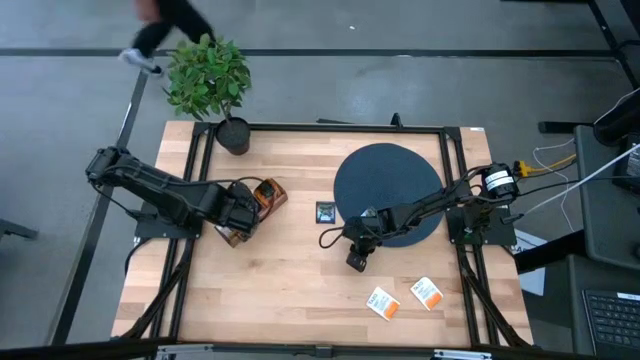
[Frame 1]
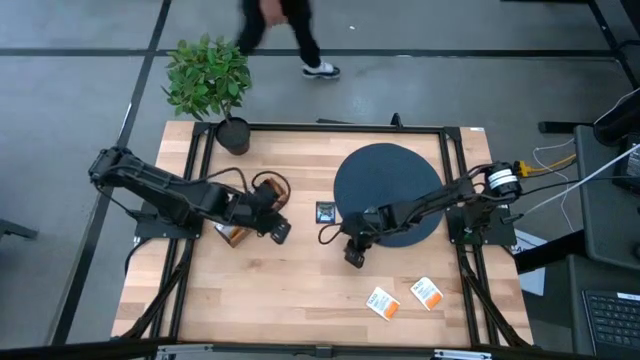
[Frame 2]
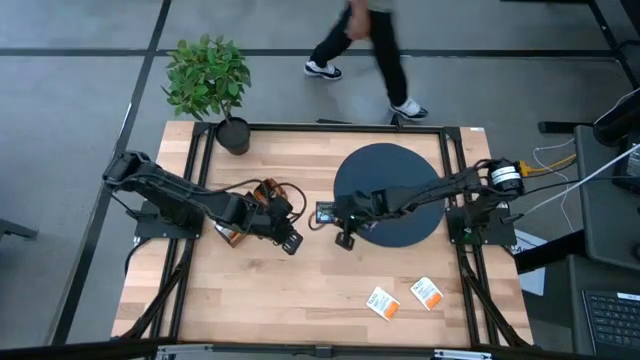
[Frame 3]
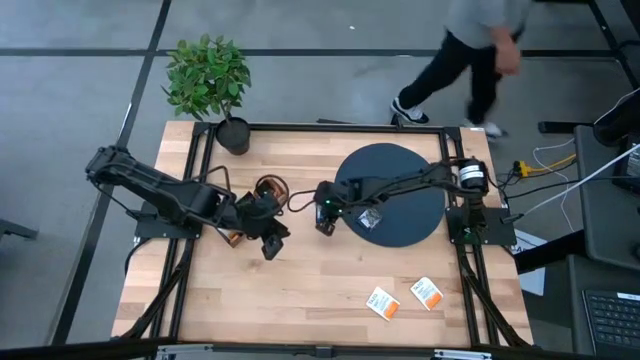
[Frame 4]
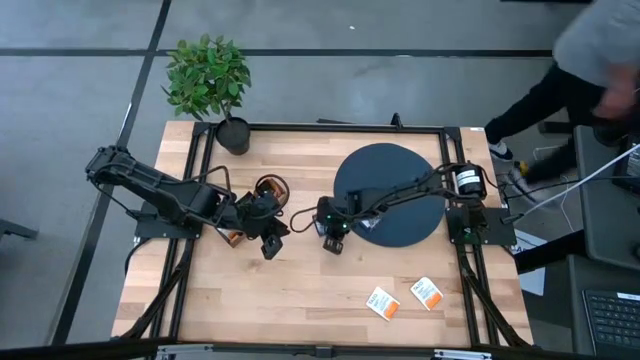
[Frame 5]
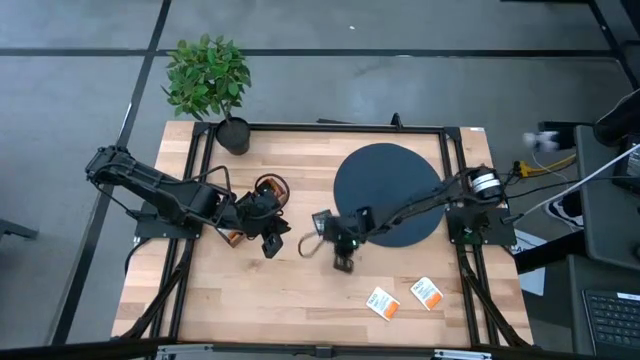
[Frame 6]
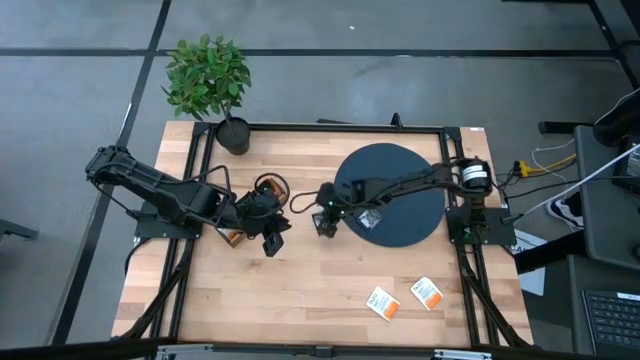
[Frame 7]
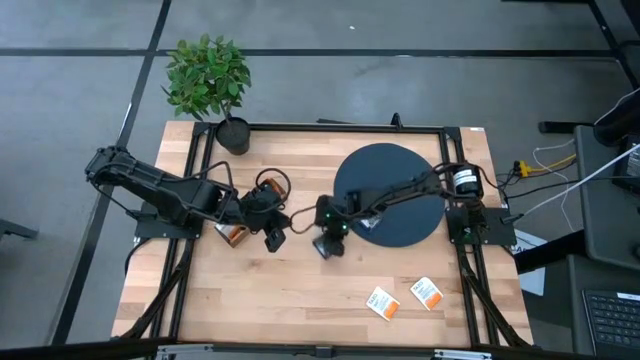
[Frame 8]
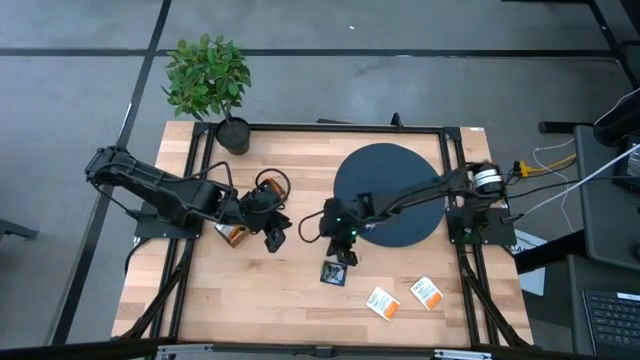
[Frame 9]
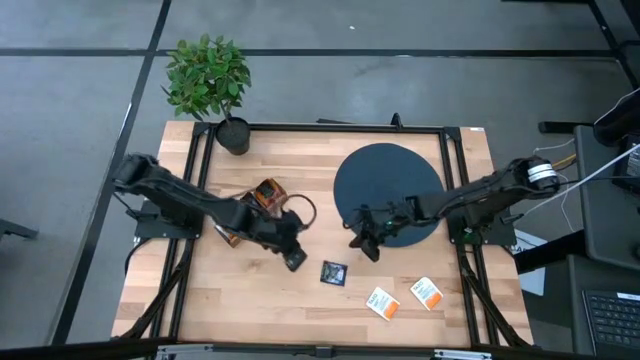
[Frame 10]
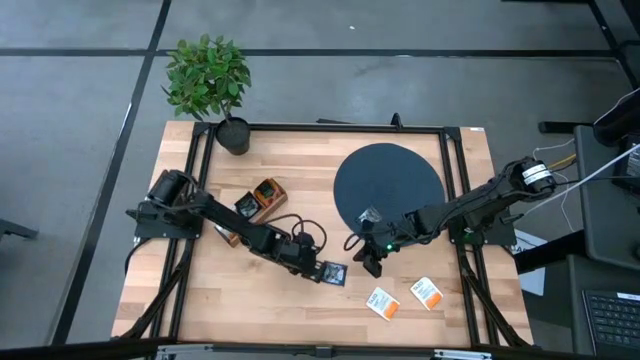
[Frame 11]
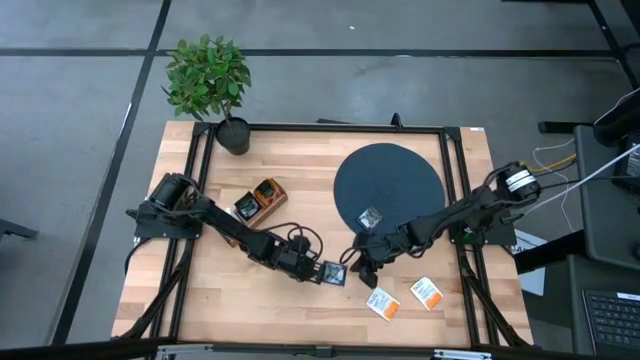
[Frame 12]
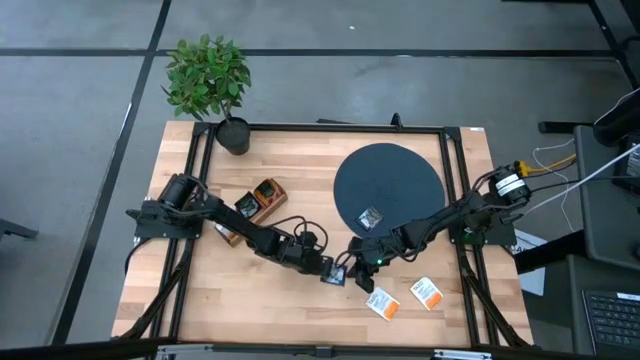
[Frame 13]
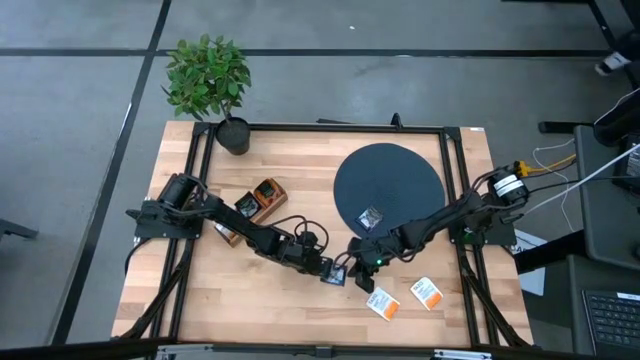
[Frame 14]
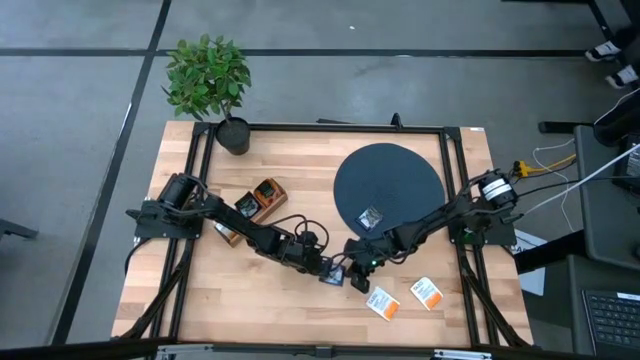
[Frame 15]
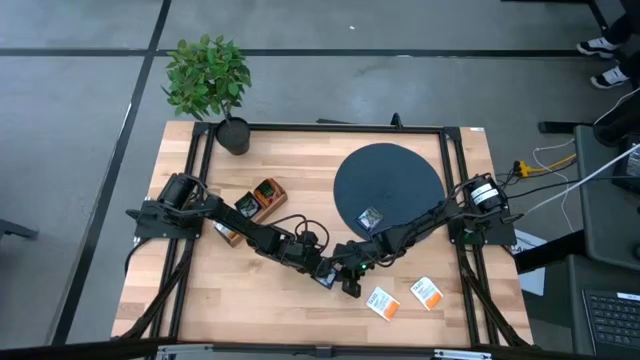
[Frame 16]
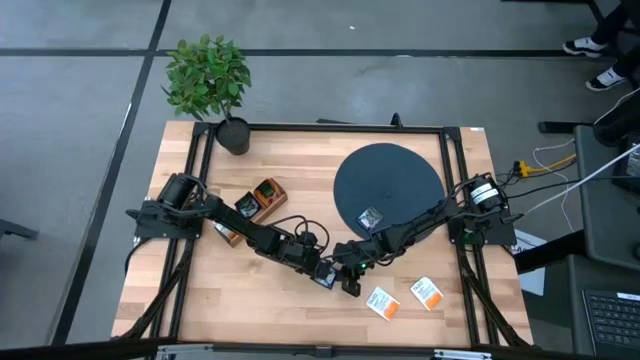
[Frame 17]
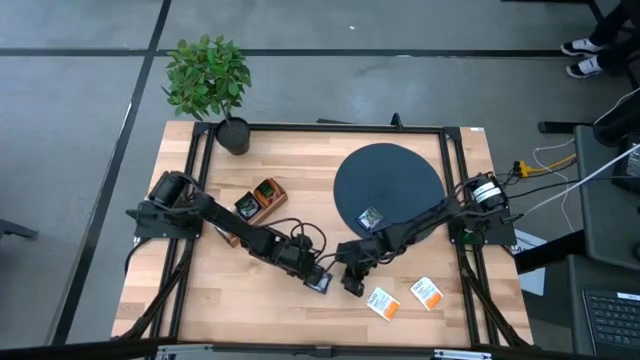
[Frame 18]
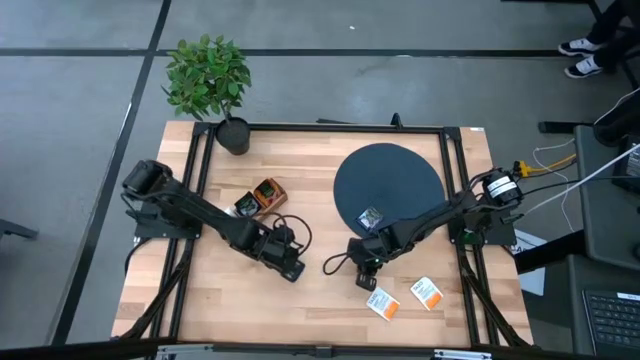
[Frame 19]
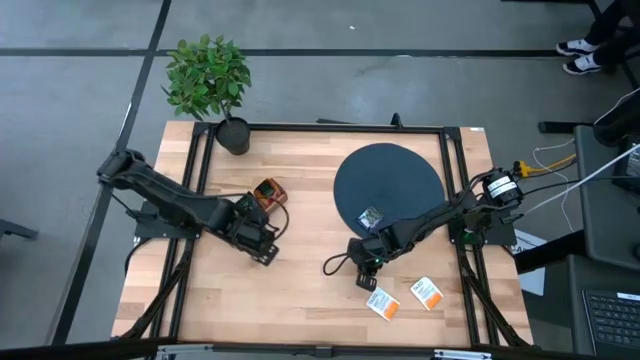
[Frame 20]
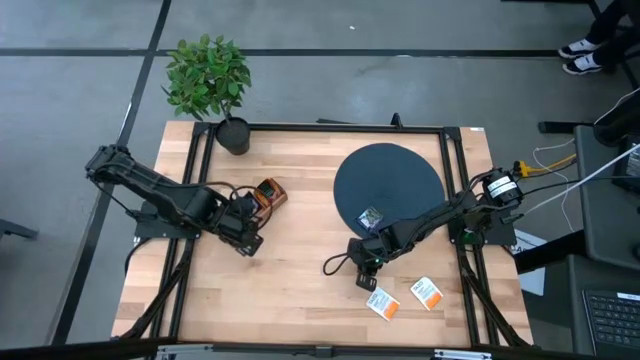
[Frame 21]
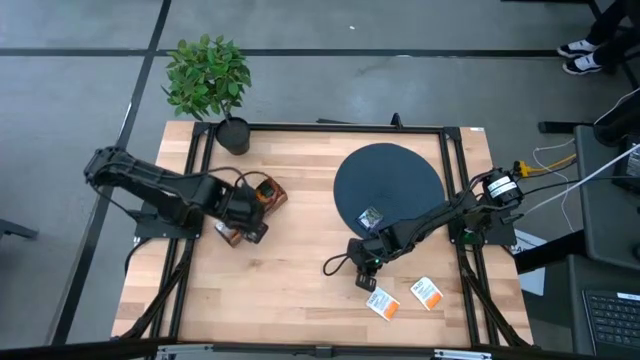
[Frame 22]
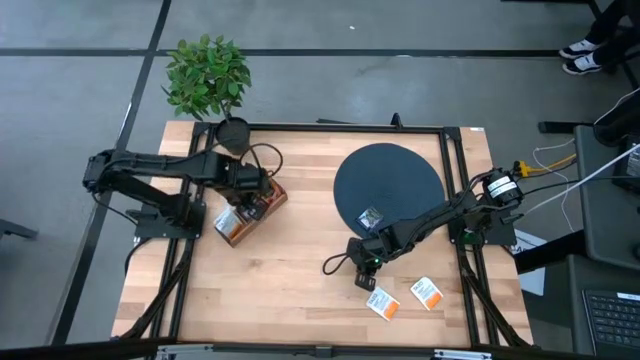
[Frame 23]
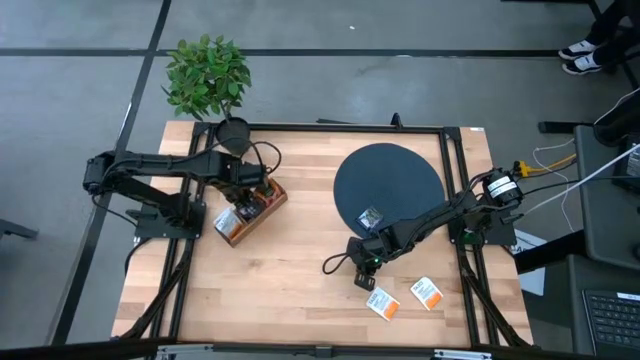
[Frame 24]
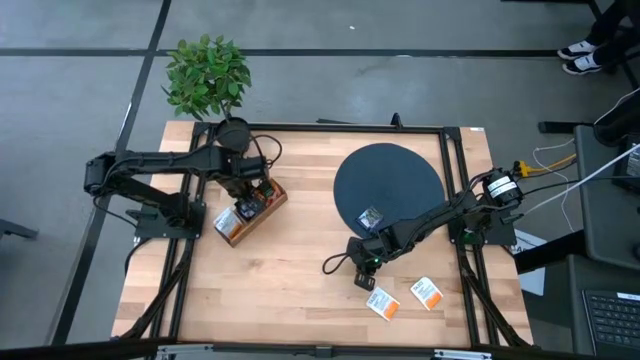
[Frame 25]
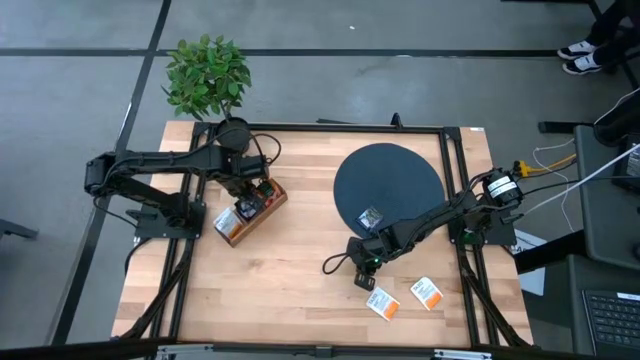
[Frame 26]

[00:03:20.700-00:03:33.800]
Task: Pick & Place Tea
Put the black tea bag into the middle section of the wooden organizer

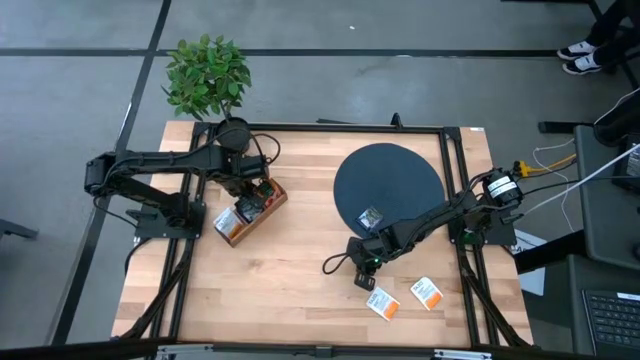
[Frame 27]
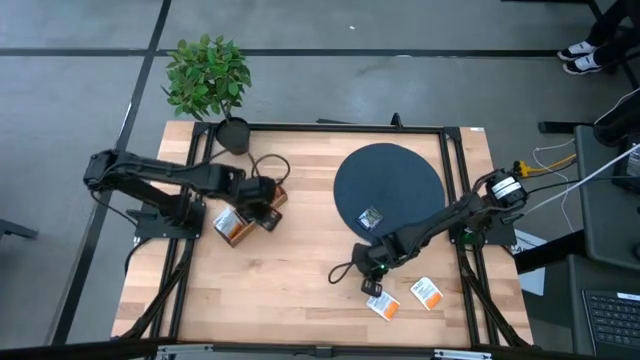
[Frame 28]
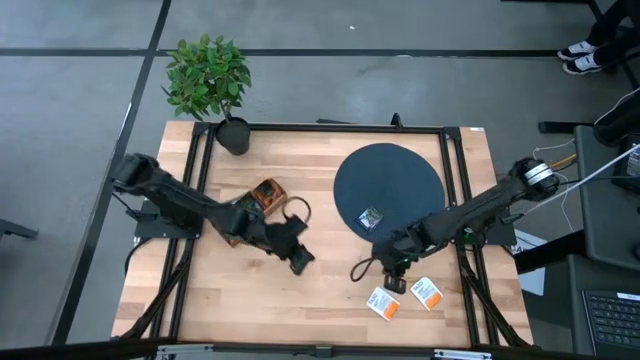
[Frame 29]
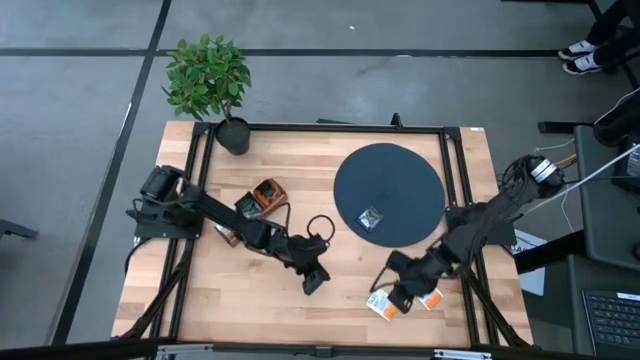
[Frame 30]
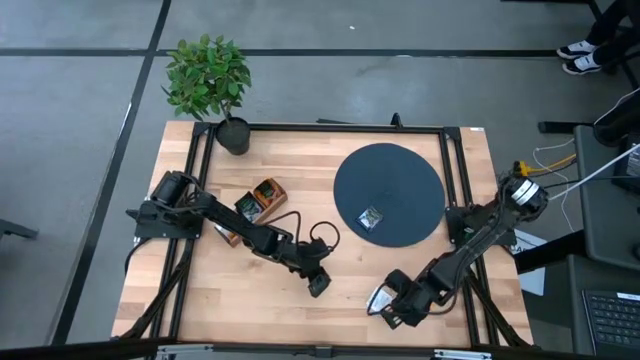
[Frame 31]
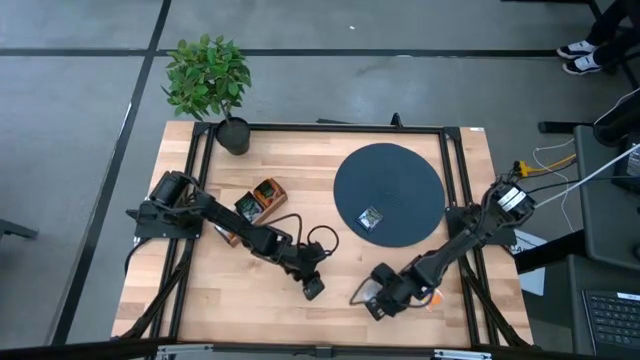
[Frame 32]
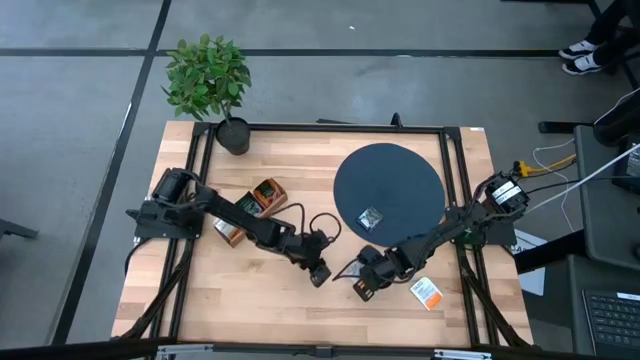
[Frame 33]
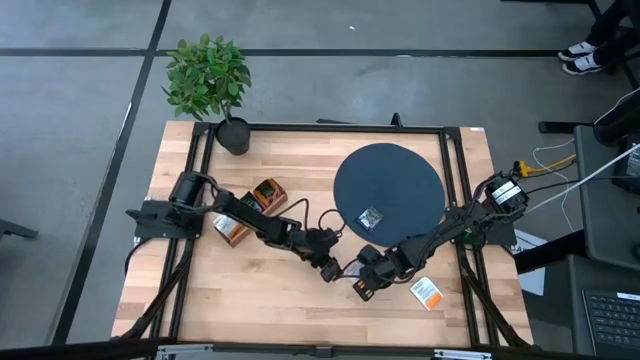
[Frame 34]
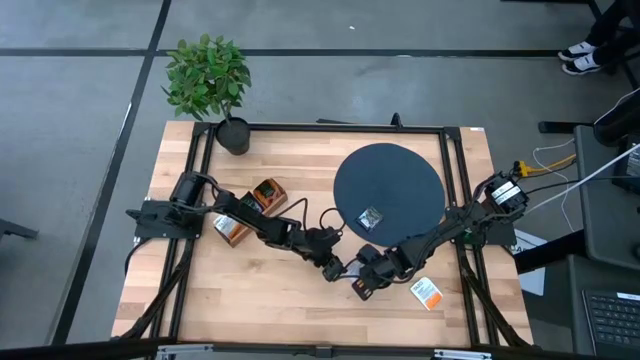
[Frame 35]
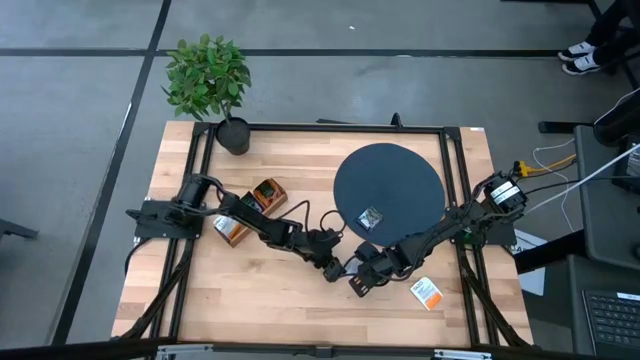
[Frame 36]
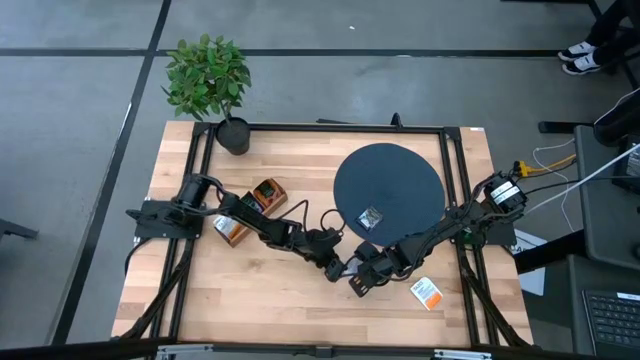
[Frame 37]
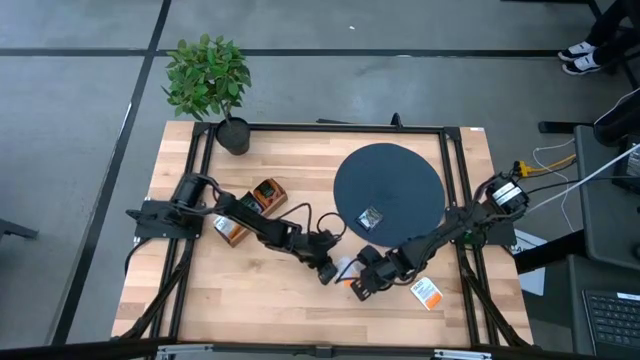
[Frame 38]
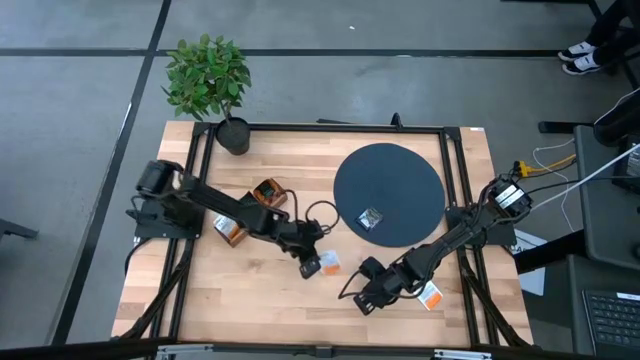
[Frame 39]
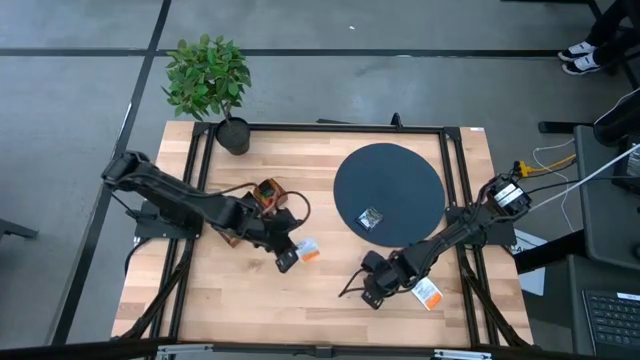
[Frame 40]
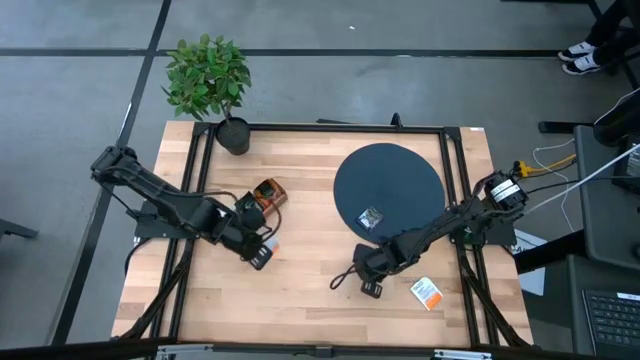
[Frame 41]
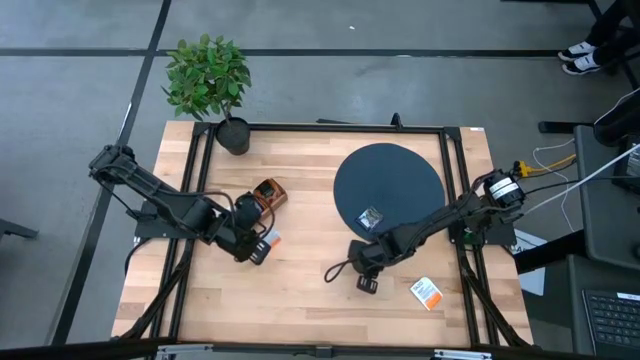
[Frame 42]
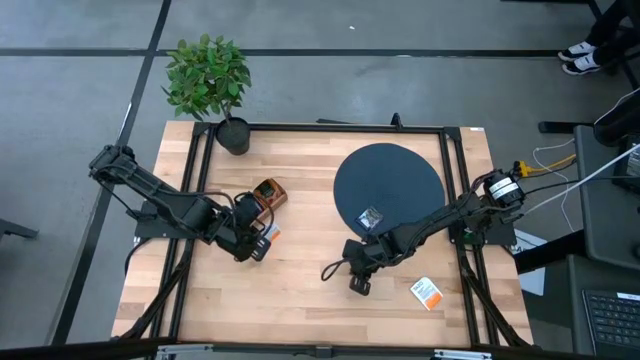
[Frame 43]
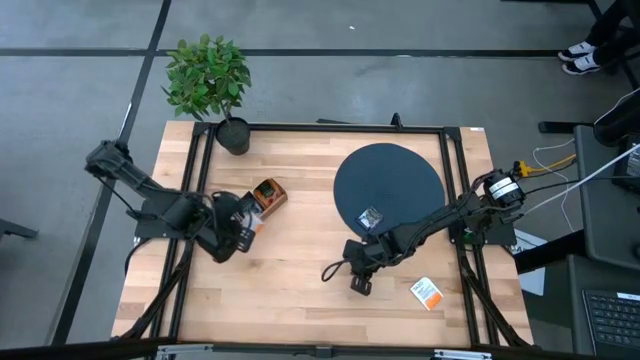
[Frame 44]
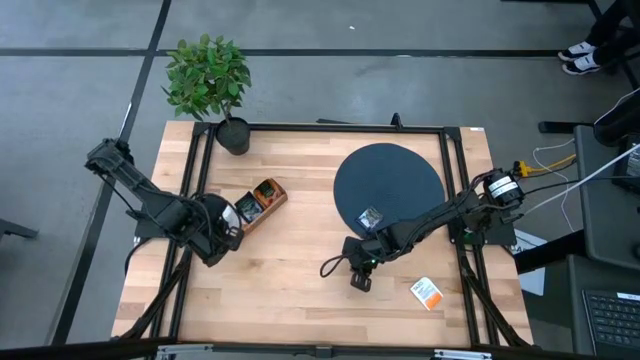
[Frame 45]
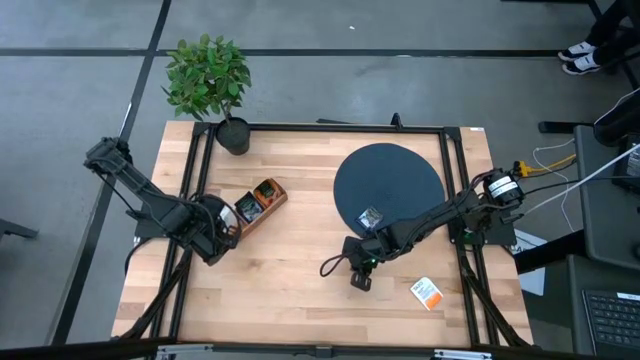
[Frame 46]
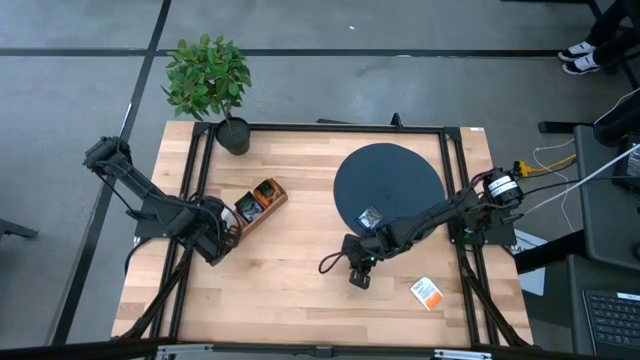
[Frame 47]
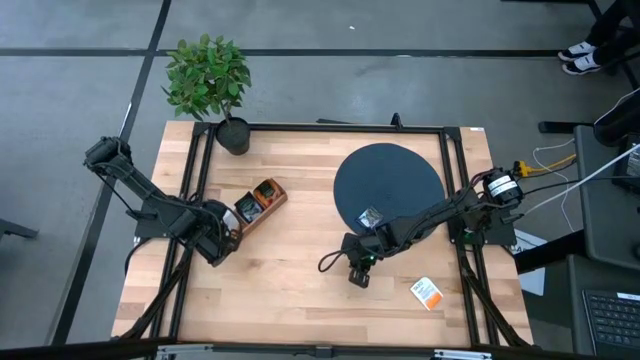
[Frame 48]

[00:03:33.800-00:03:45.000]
Put the white tea bag into the left section of the wooden organizer
